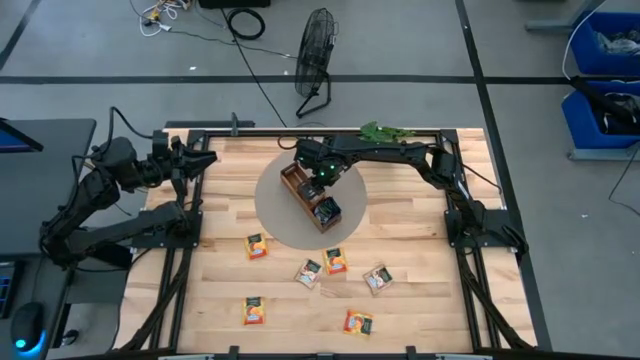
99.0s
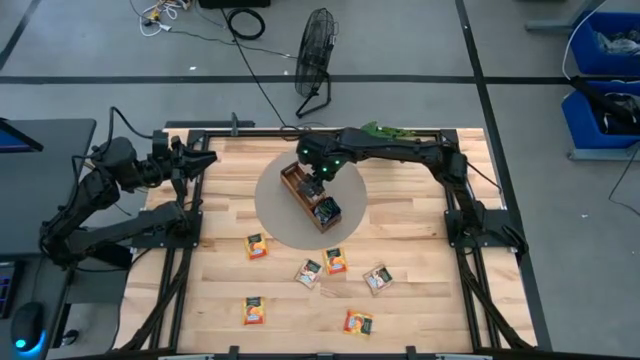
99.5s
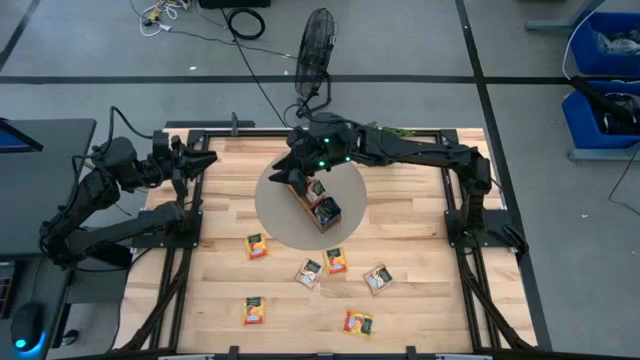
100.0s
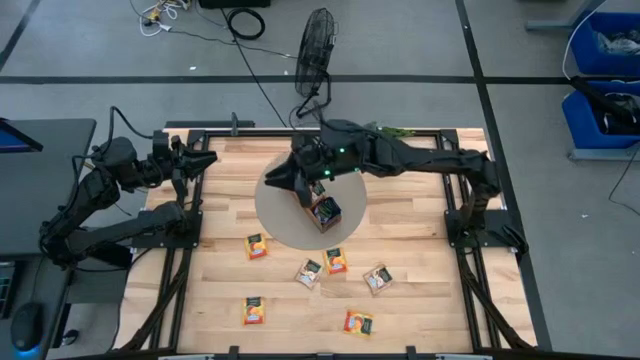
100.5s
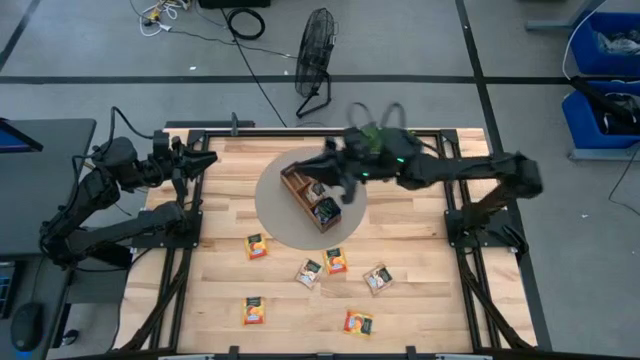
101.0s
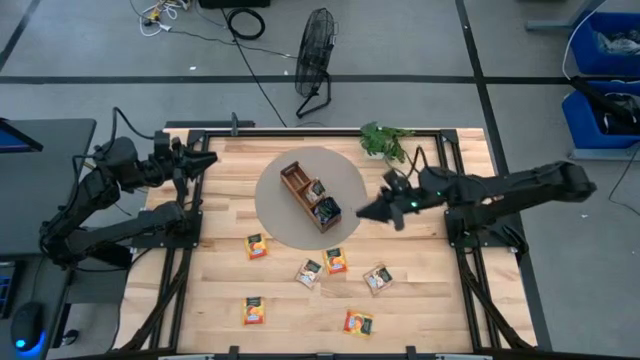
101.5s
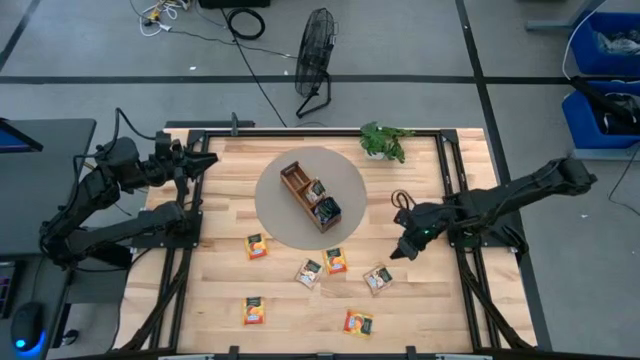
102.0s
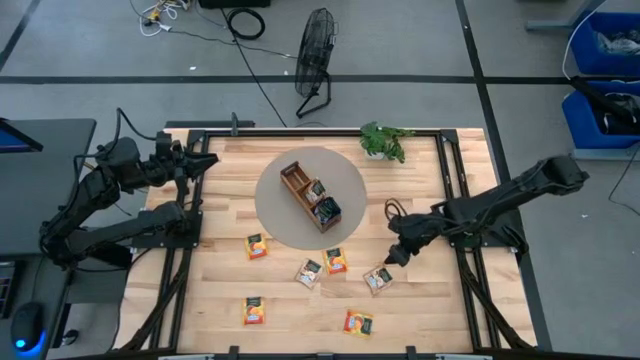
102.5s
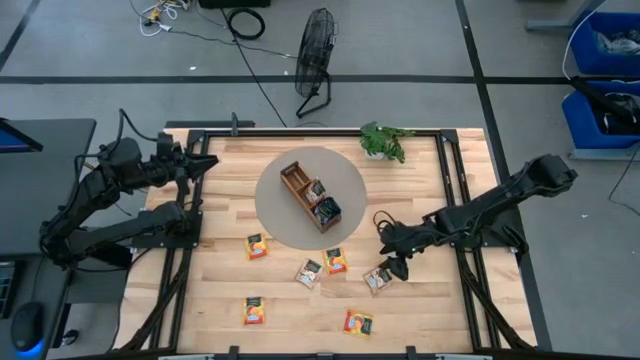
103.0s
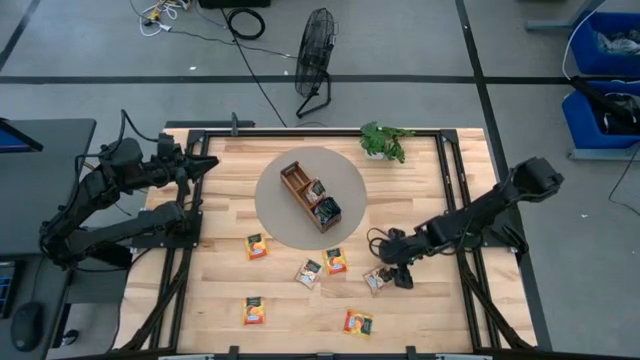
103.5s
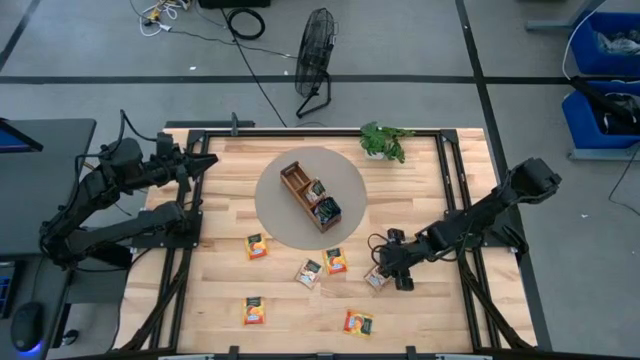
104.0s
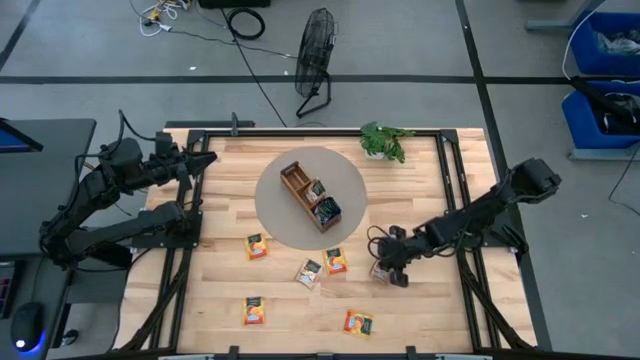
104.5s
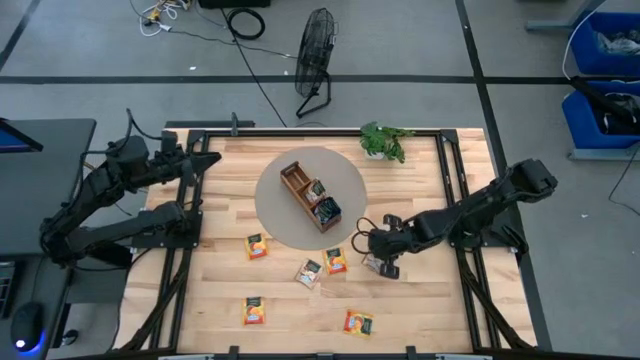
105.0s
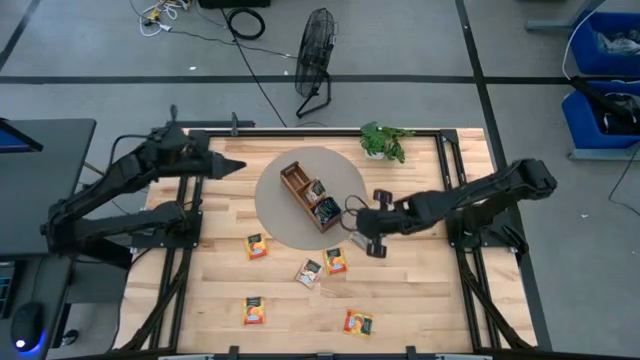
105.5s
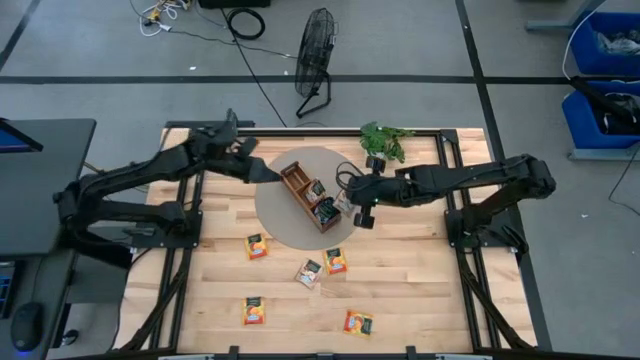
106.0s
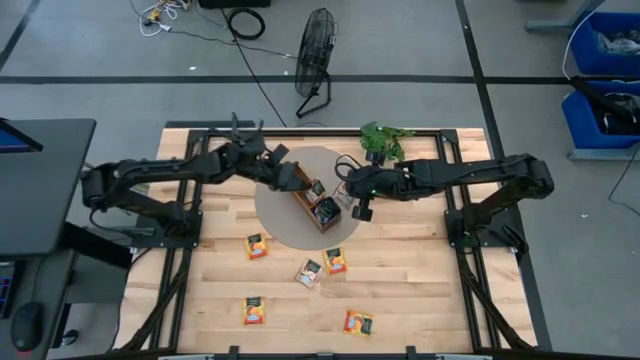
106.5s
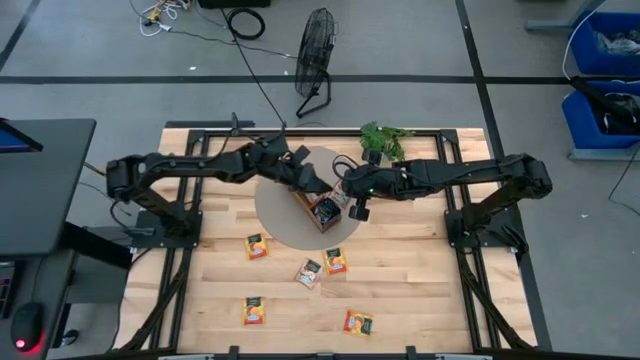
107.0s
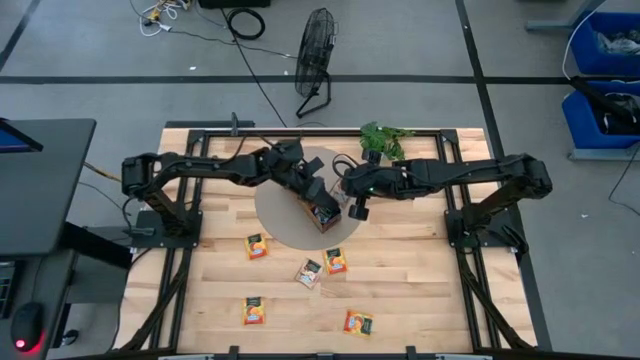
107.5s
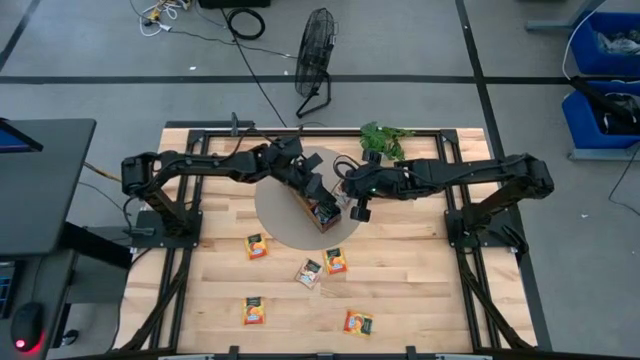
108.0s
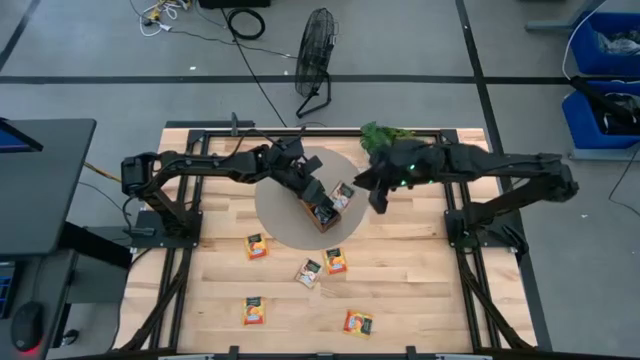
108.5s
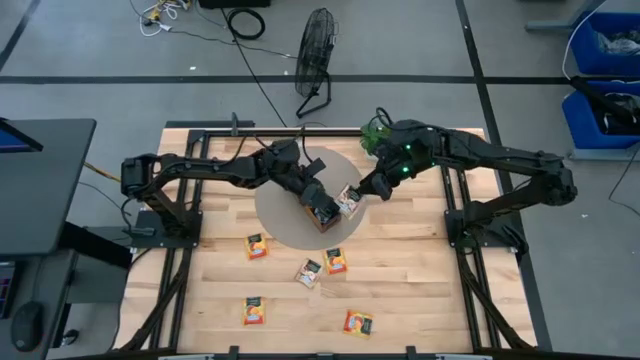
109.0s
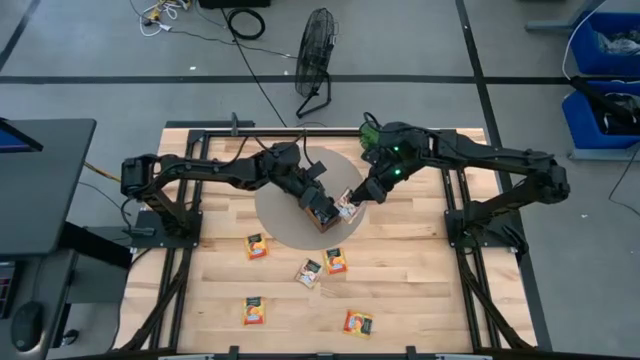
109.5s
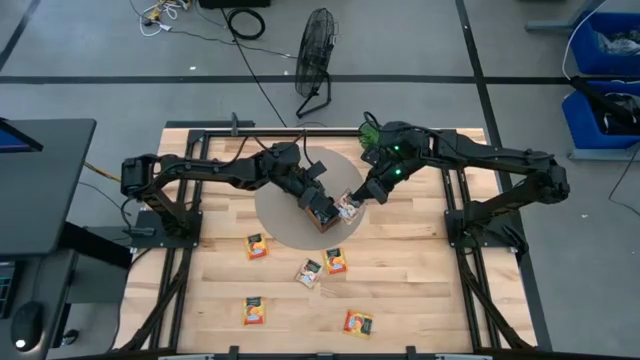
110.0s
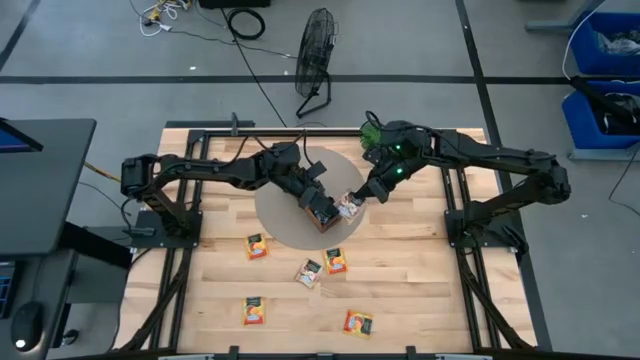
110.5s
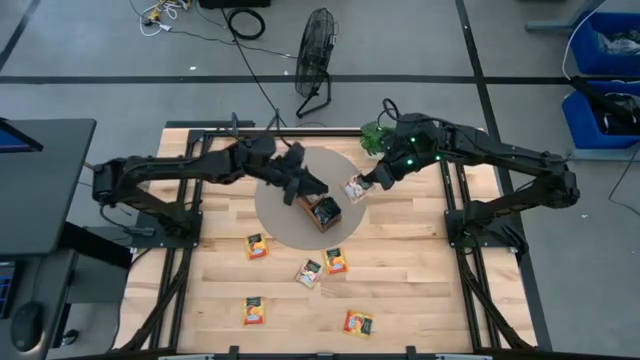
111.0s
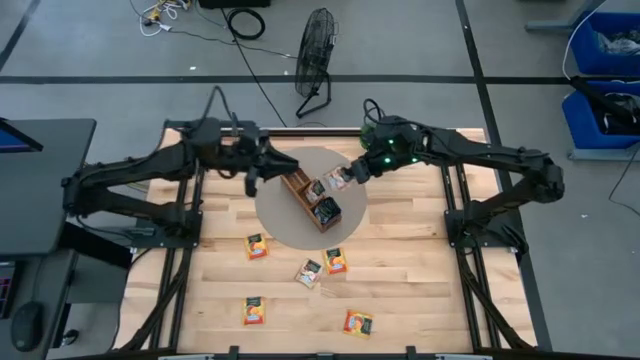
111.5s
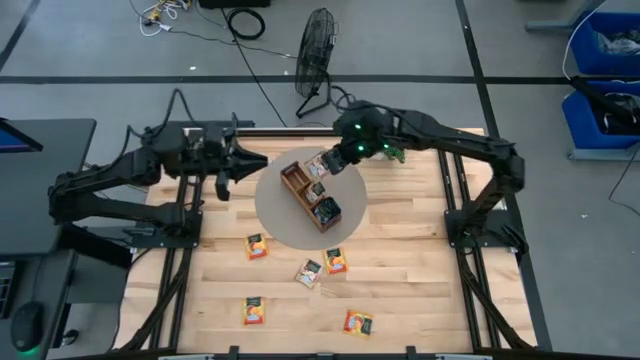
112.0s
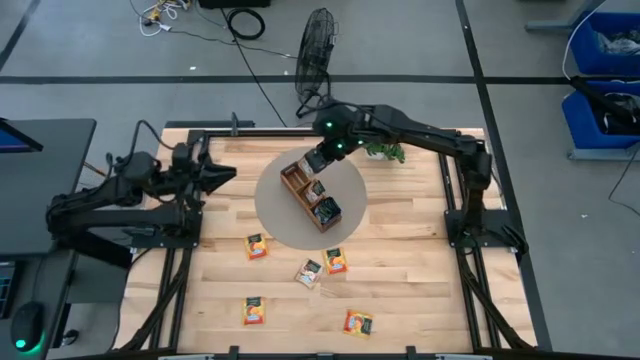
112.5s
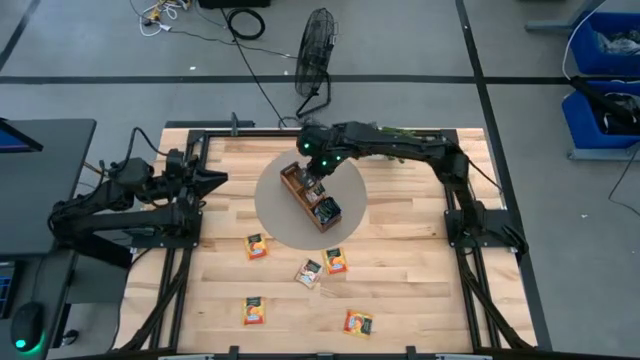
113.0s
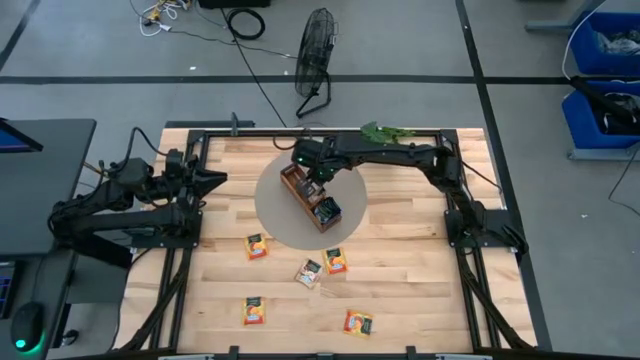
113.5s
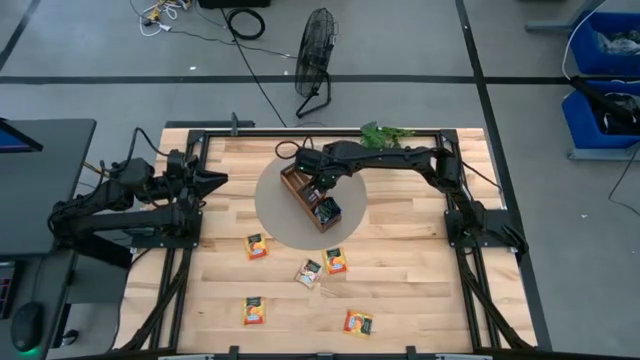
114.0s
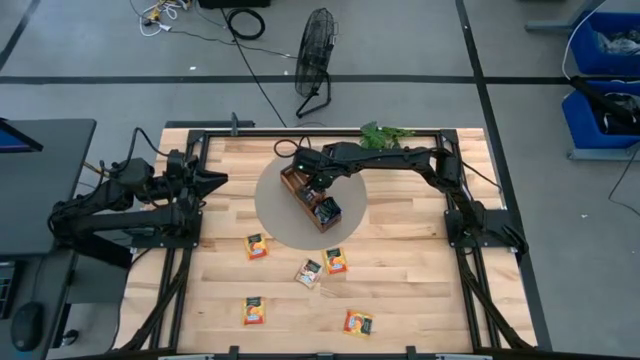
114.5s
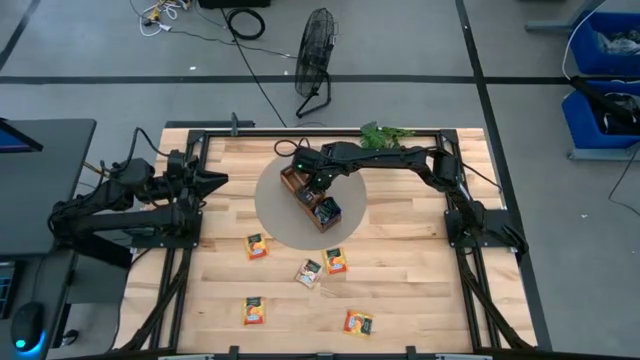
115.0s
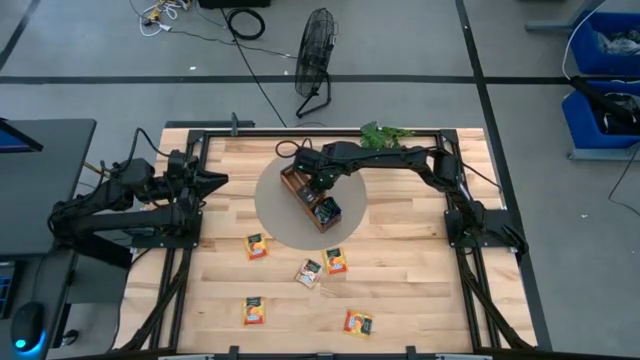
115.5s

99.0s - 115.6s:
Task: Pick & Place Tea
Put the brown tea bag into the middle section of the wooden organizer

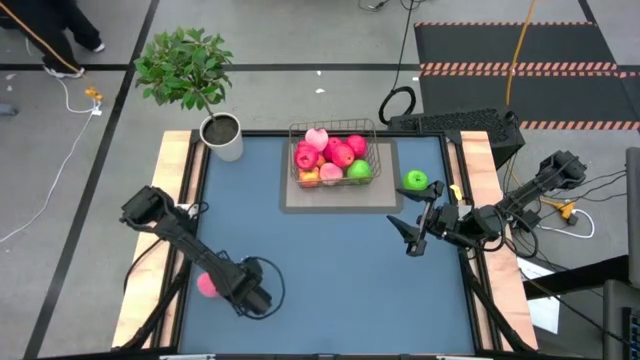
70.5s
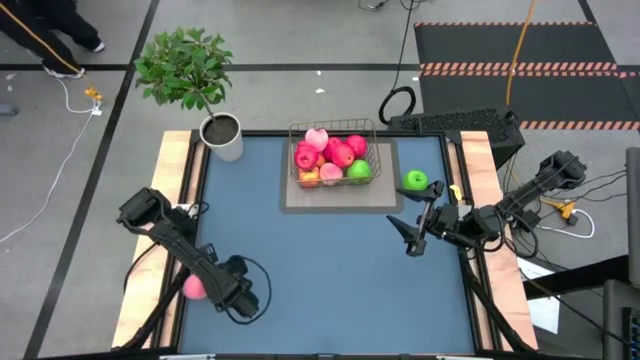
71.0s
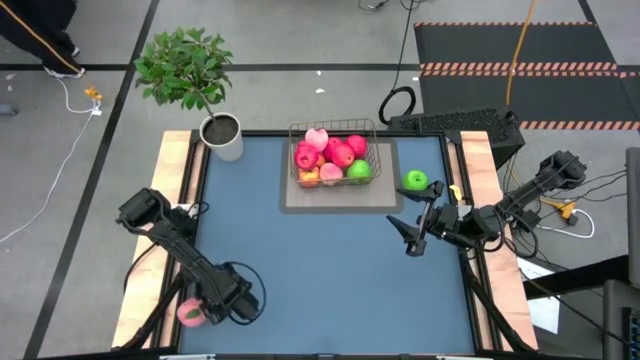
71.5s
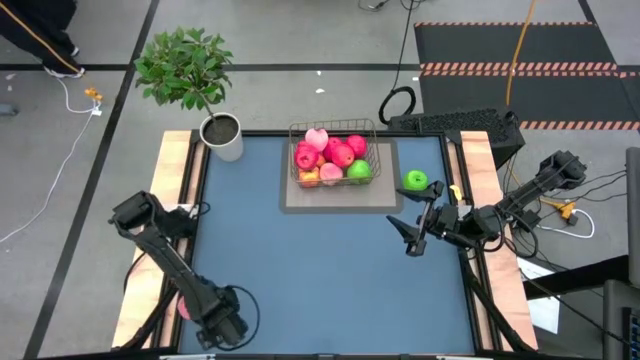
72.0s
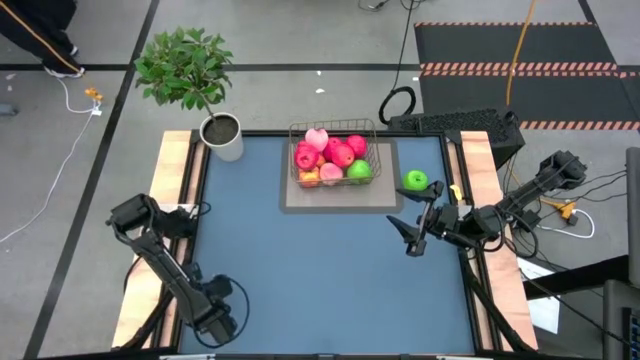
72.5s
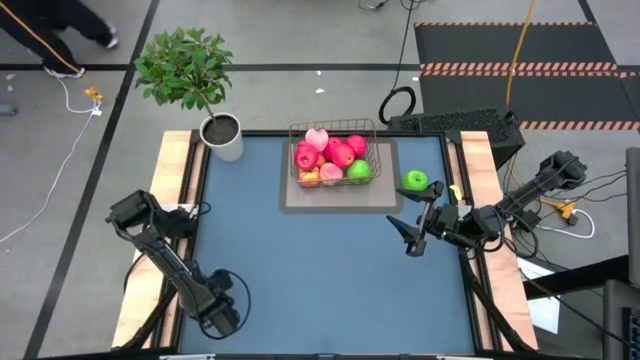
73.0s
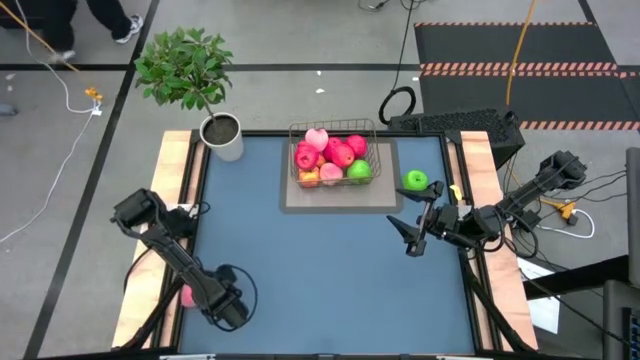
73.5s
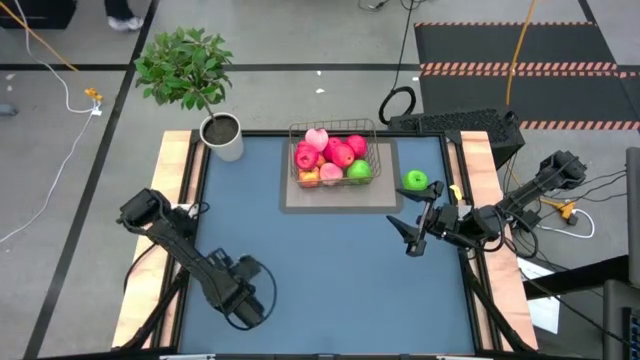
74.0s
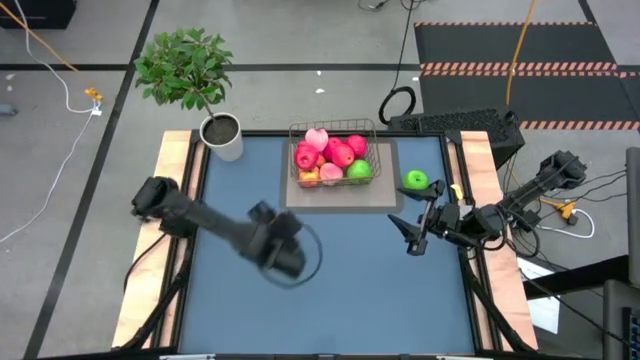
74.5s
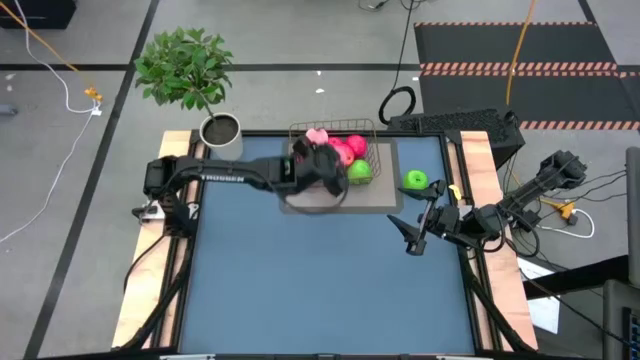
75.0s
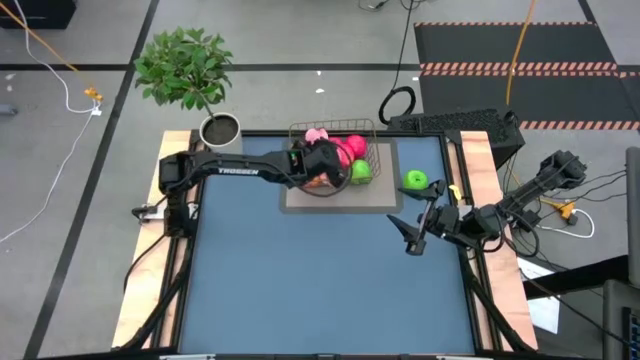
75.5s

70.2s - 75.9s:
Task: Build produce basket
Put the pink peach into the wire basket
